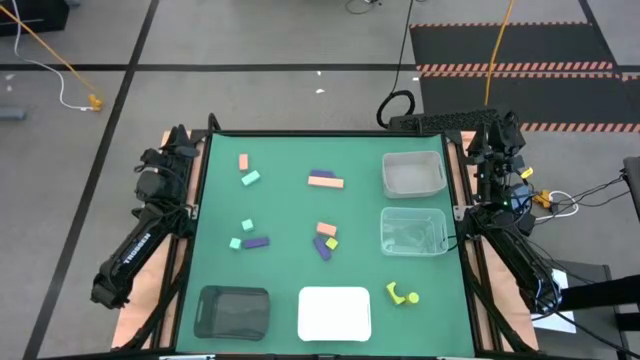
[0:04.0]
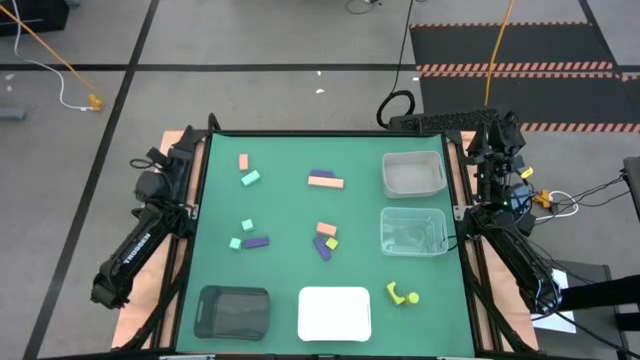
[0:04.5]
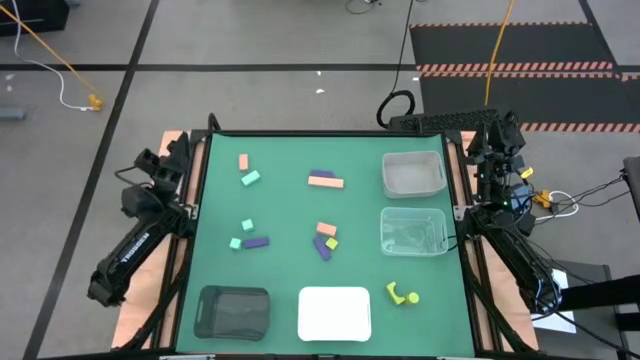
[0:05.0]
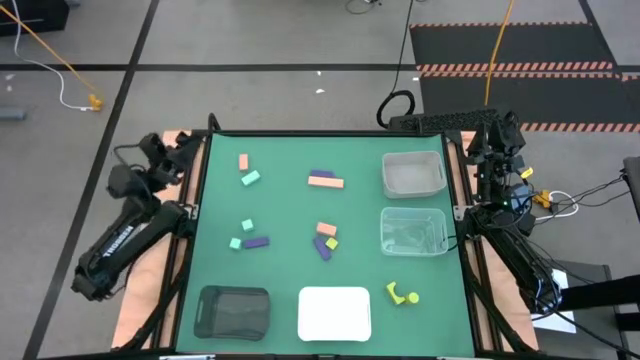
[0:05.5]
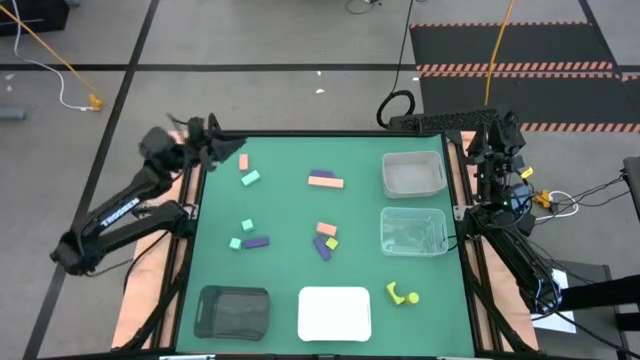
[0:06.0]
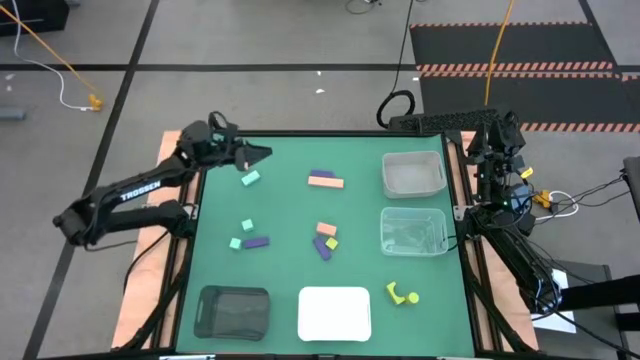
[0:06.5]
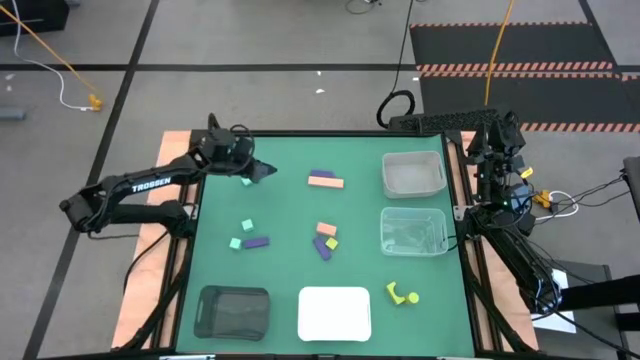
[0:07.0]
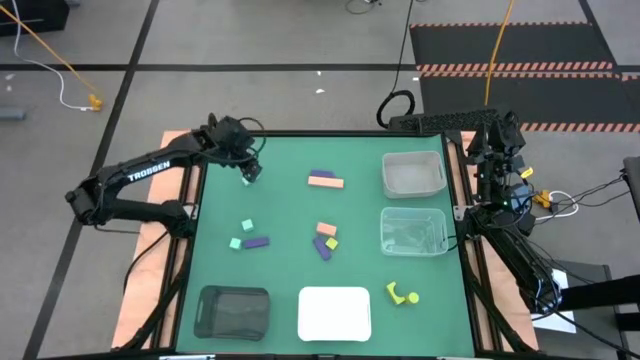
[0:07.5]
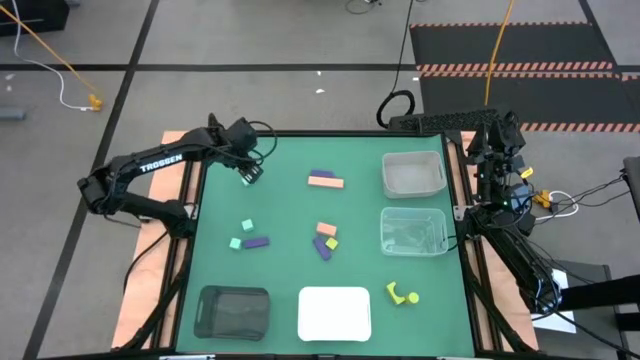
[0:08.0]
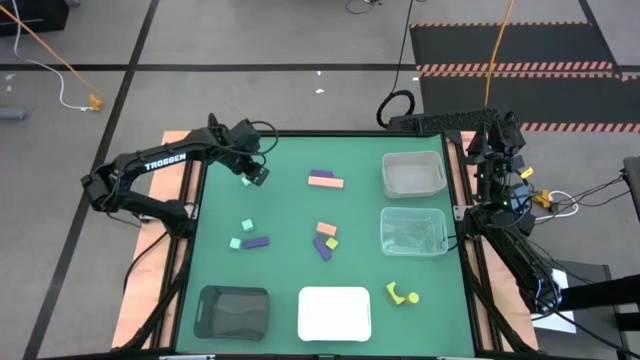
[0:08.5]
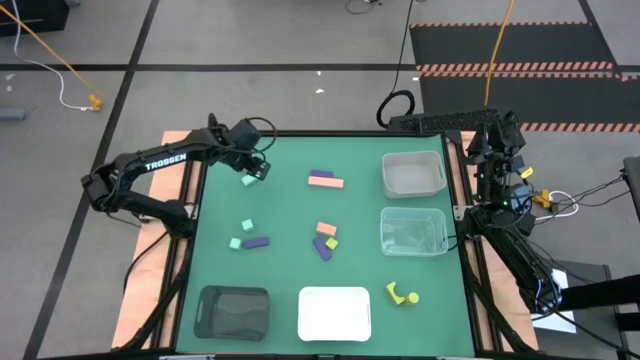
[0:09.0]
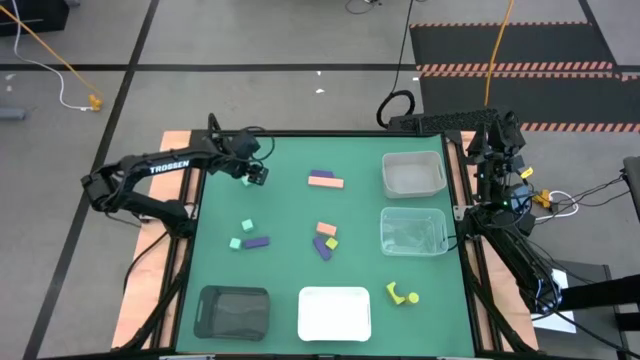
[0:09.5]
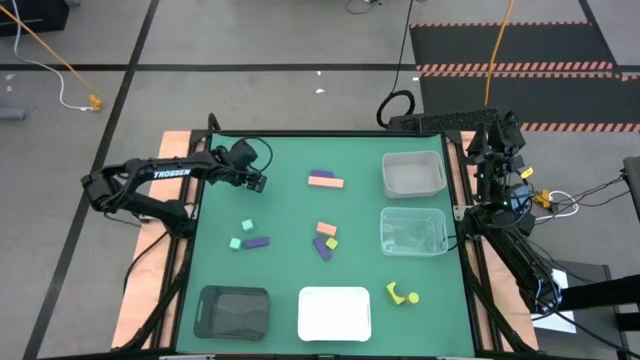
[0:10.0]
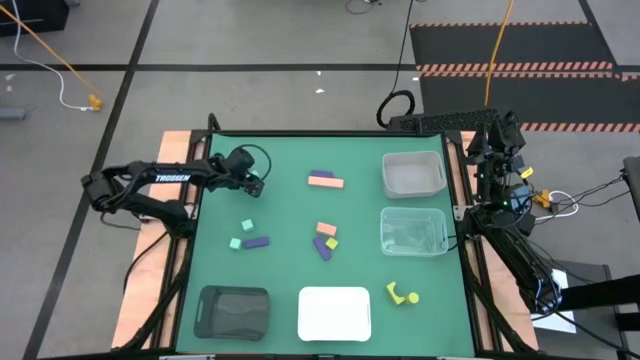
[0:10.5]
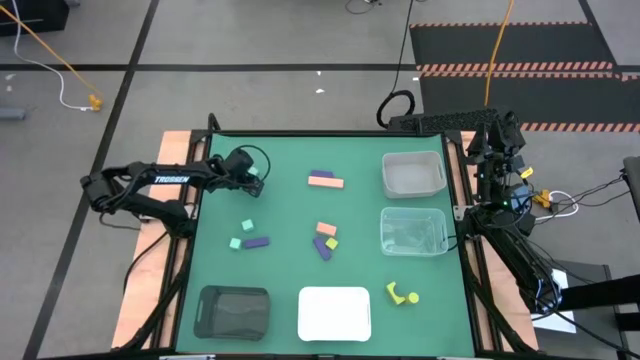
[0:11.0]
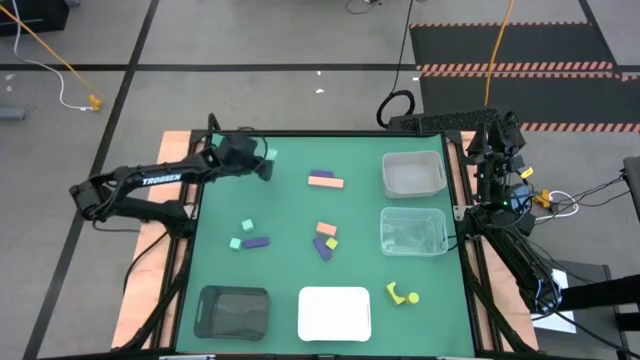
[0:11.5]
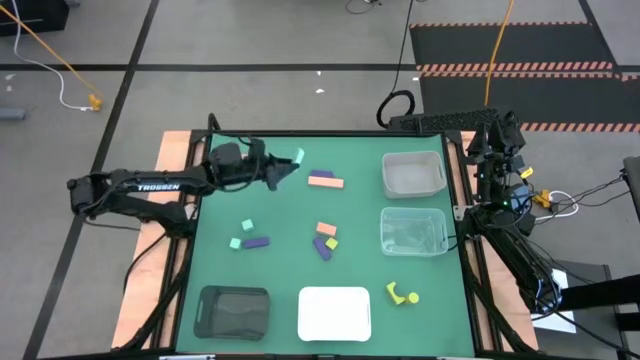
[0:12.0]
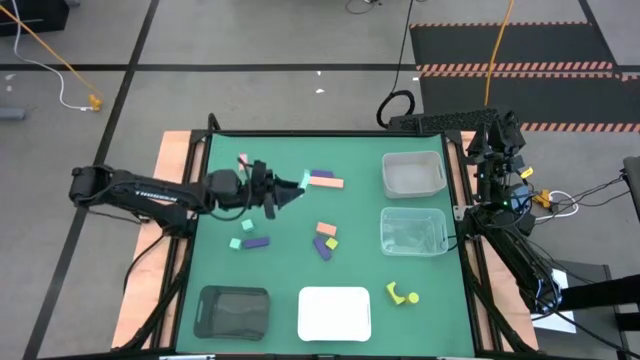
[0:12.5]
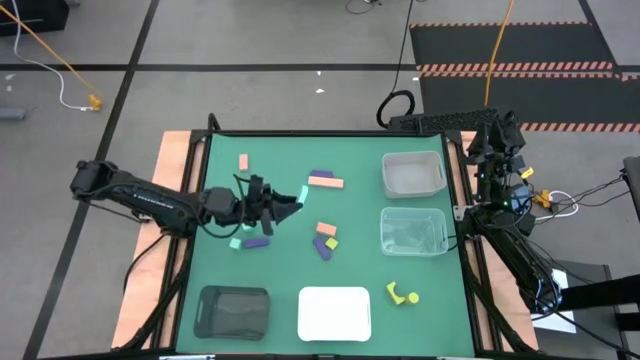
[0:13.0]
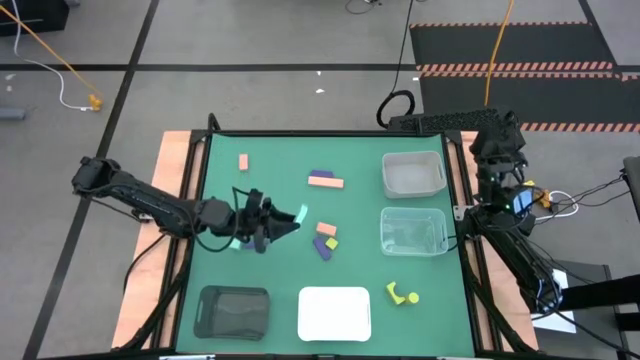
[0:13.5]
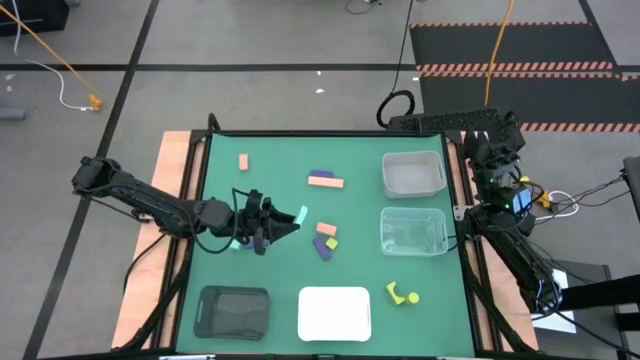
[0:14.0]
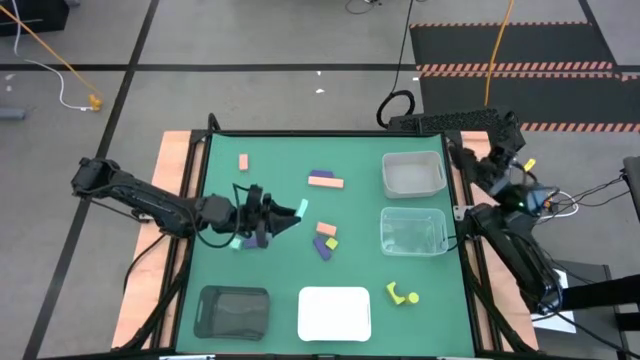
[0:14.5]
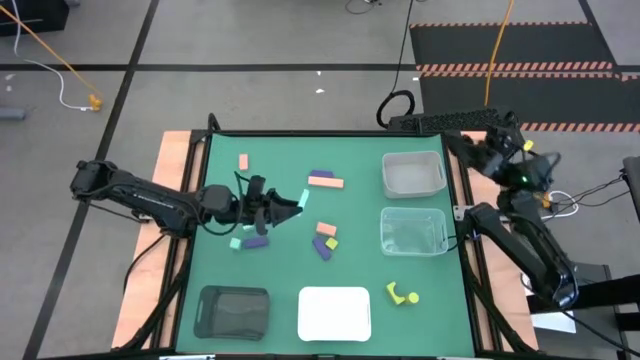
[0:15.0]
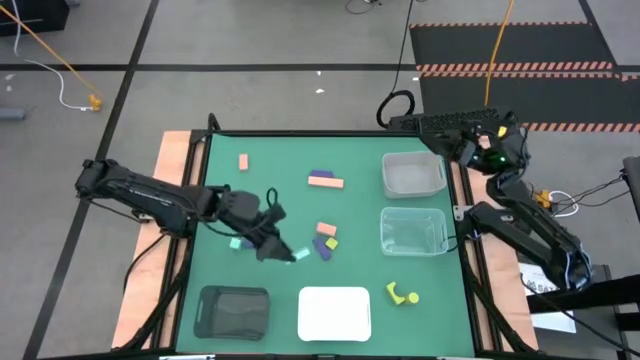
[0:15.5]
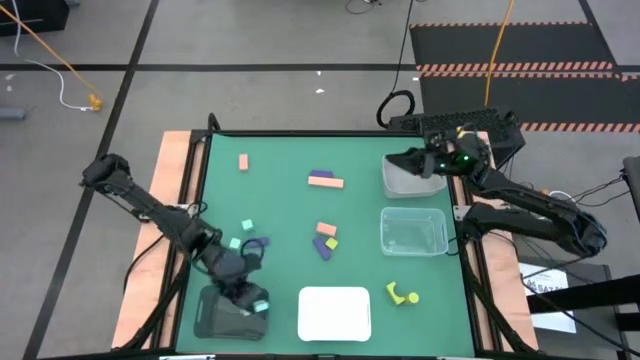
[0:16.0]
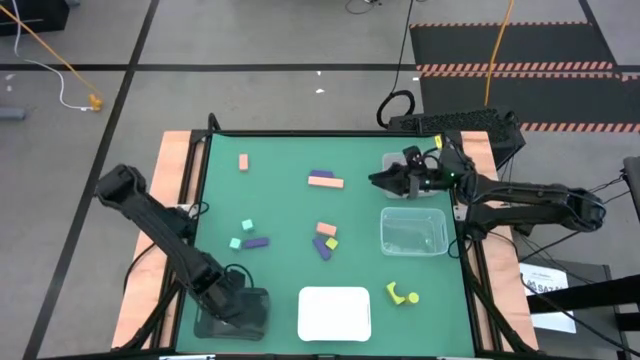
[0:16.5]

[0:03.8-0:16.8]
Task: Sort & place blocks by color
Put the top light blue block into the black bin

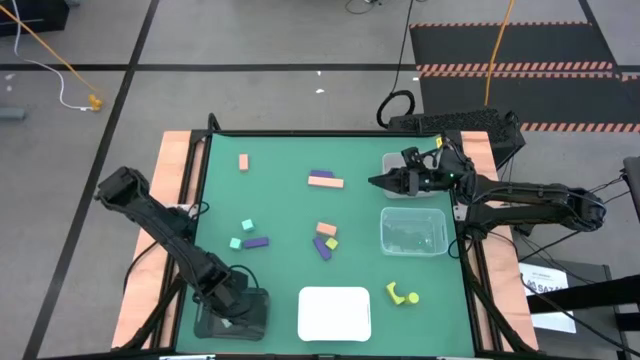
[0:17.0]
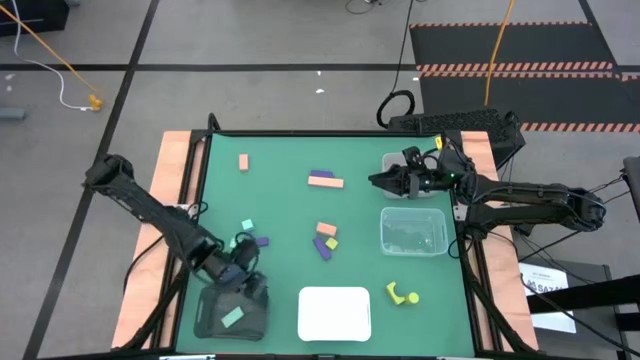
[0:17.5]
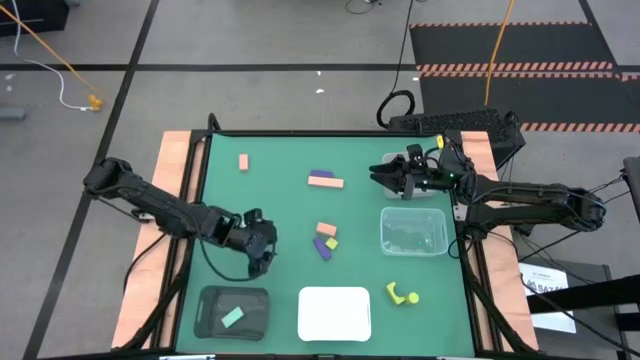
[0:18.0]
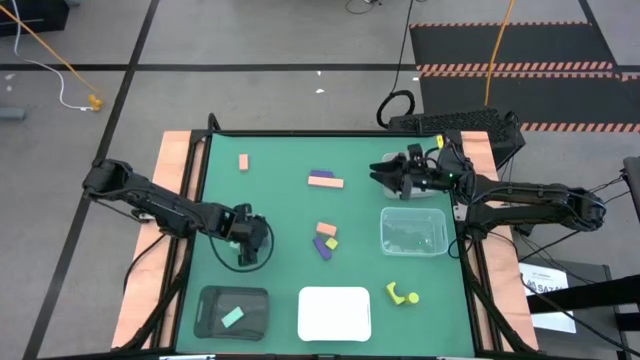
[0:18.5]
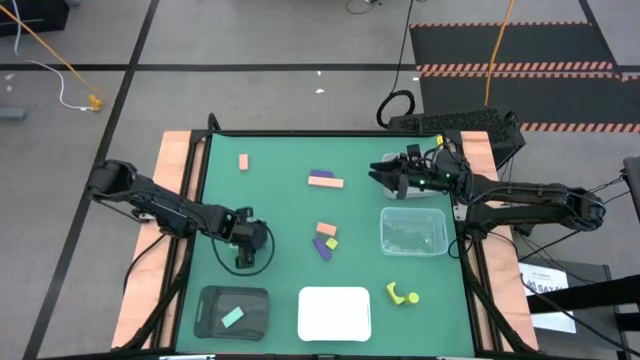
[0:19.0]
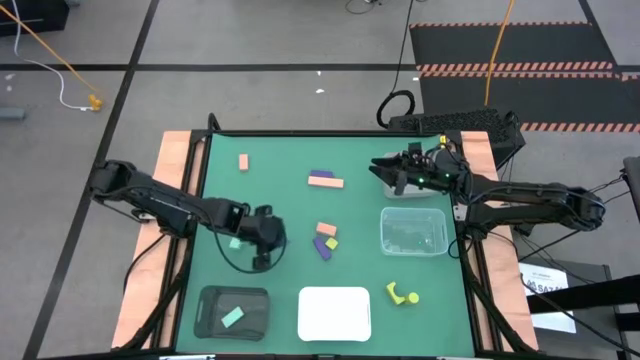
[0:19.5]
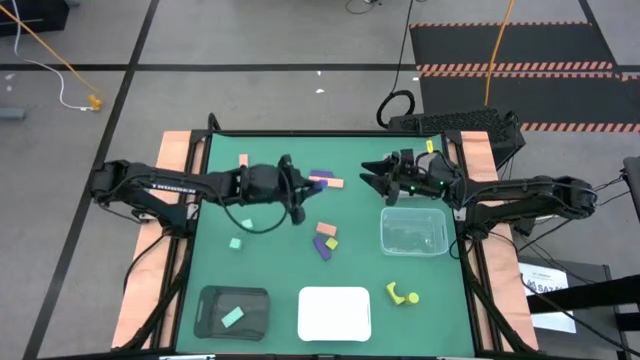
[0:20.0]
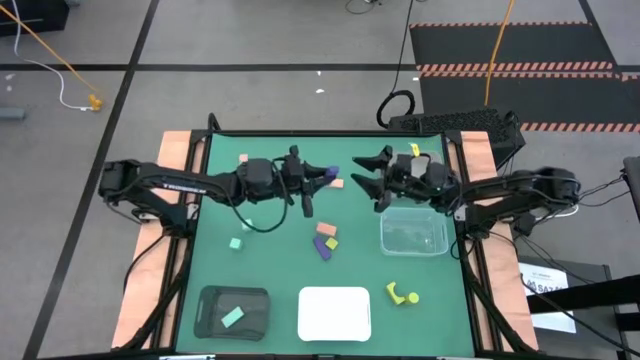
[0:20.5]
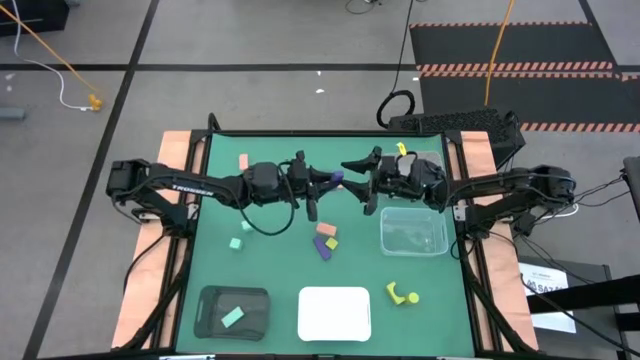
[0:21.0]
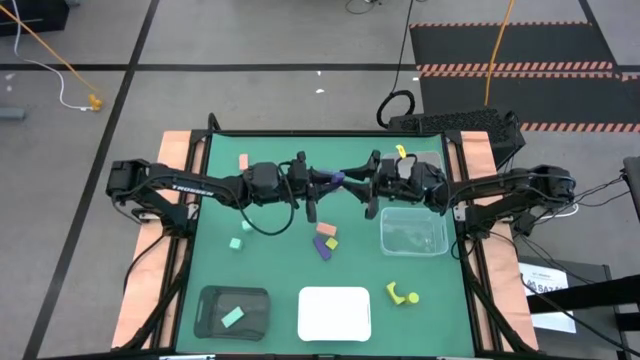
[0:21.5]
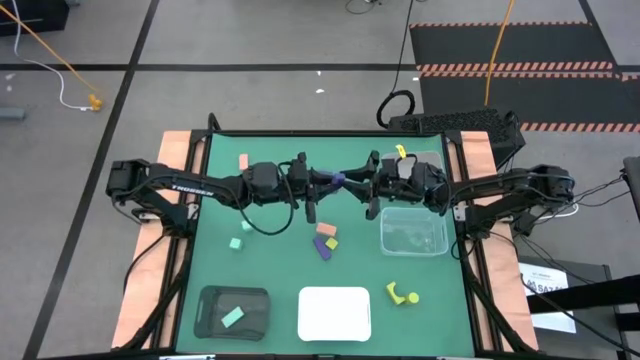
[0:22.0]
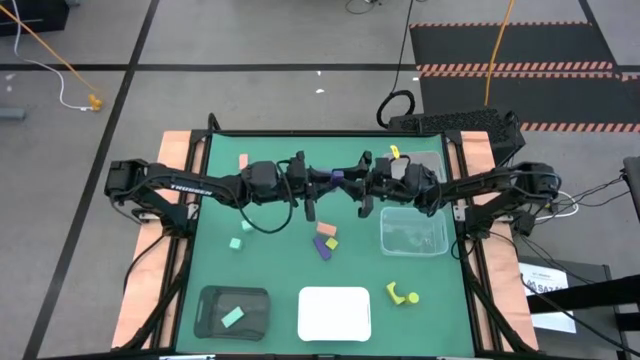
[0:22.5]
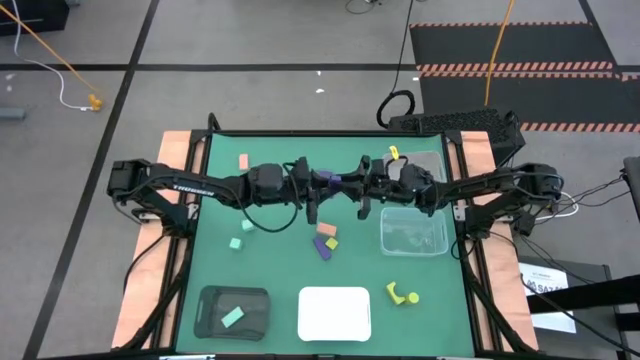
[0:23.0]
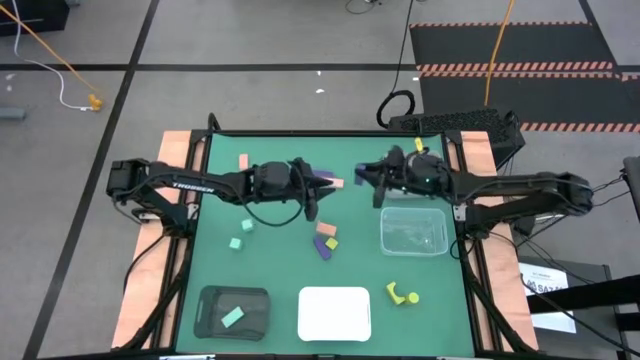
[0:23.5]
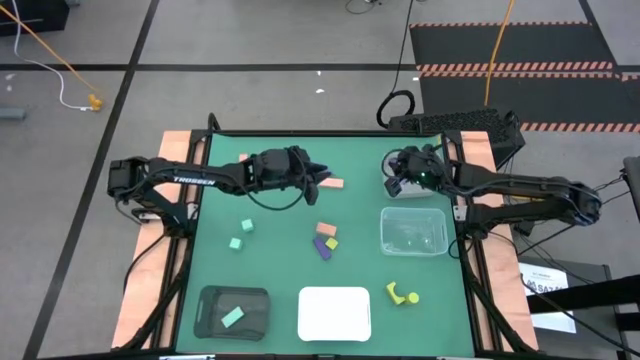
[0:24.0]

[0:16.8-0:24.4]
Put bottom the left purple block into the gray bin
